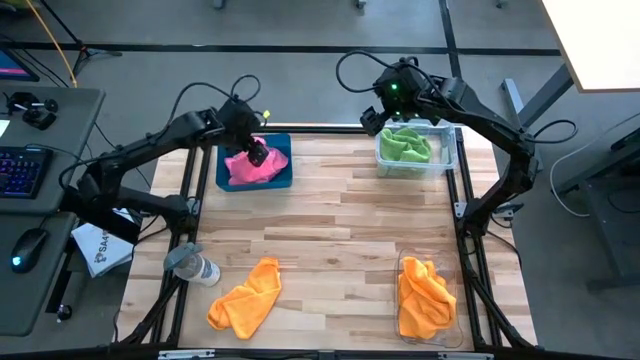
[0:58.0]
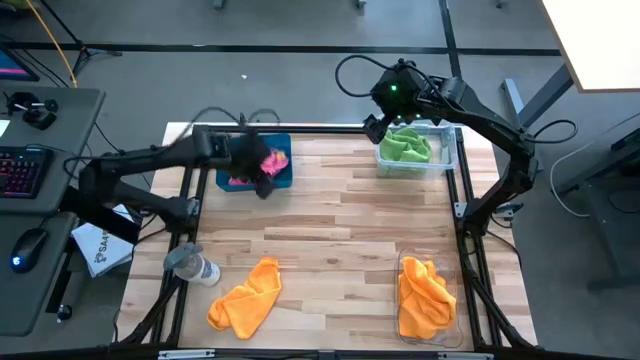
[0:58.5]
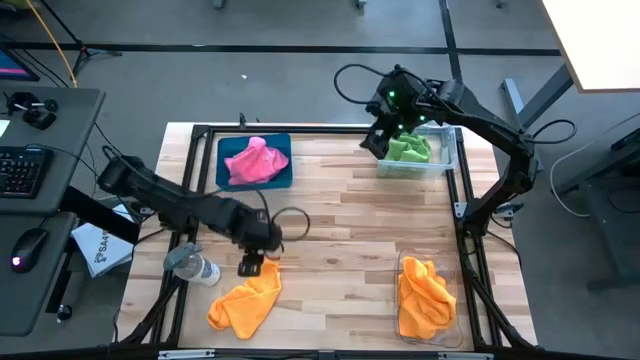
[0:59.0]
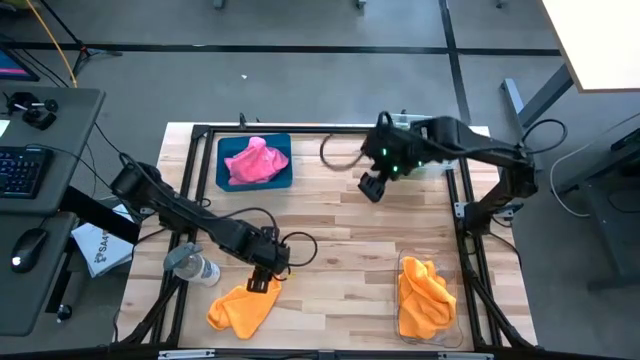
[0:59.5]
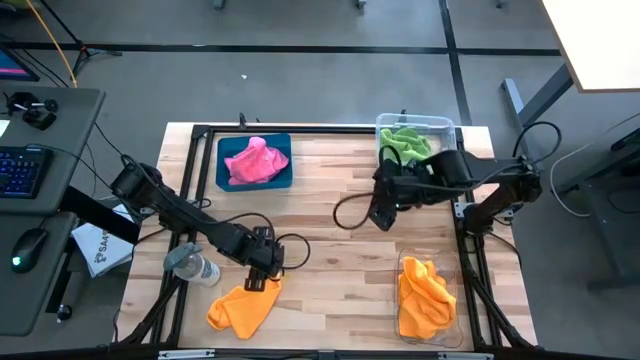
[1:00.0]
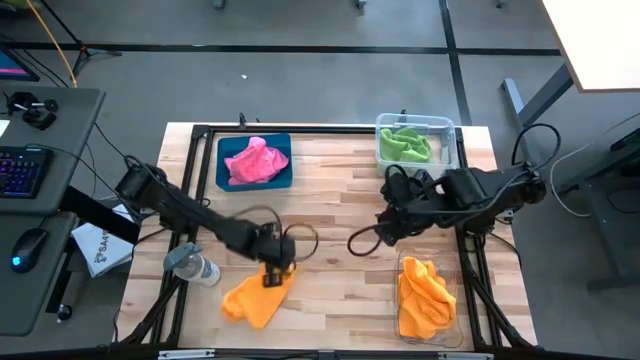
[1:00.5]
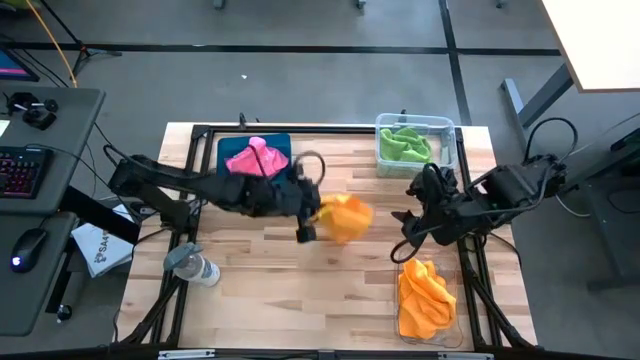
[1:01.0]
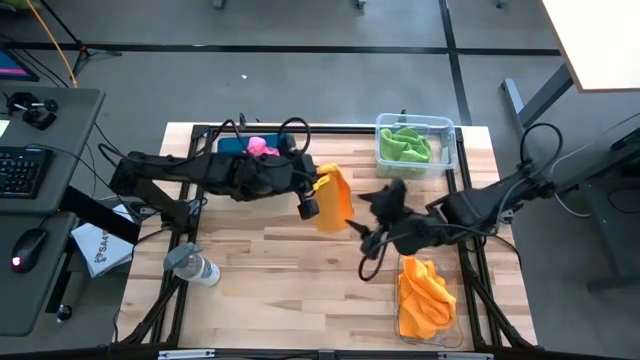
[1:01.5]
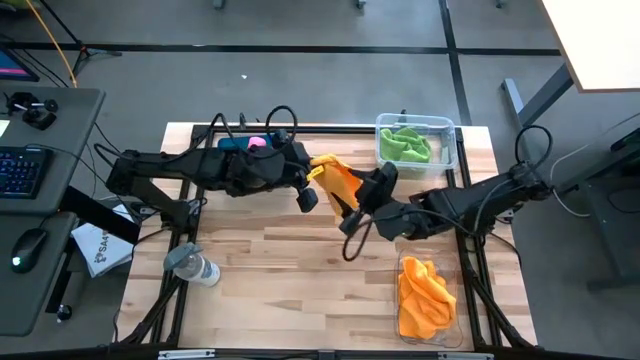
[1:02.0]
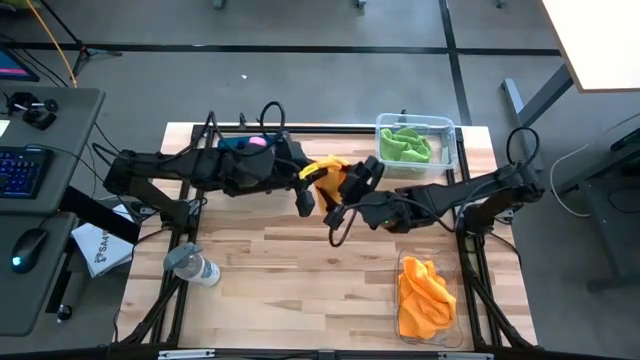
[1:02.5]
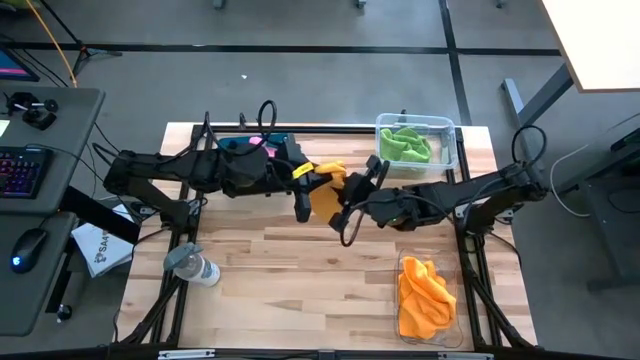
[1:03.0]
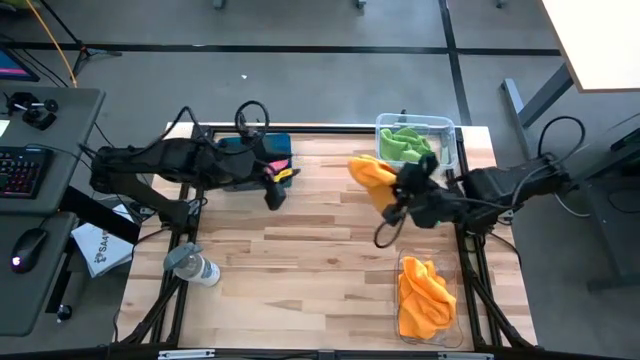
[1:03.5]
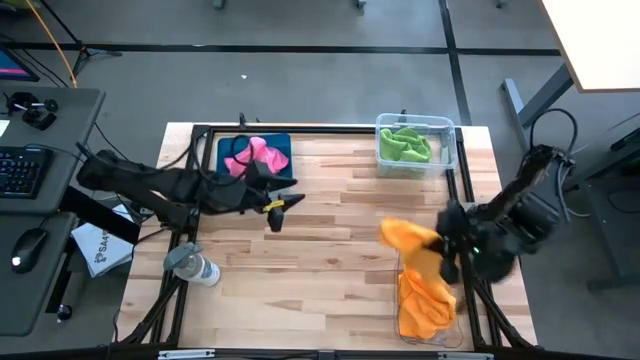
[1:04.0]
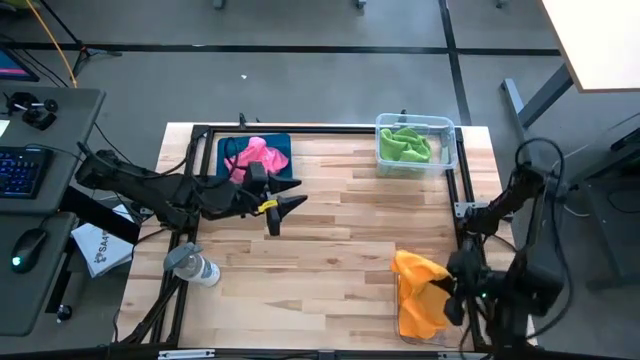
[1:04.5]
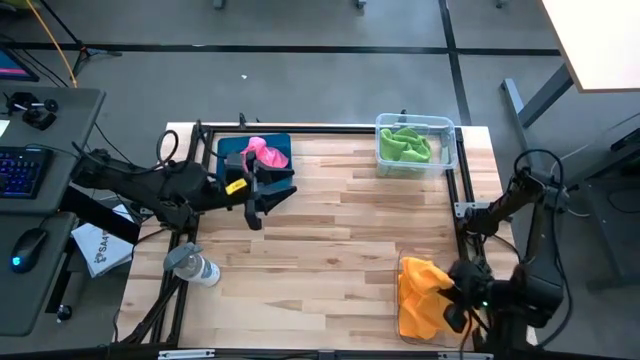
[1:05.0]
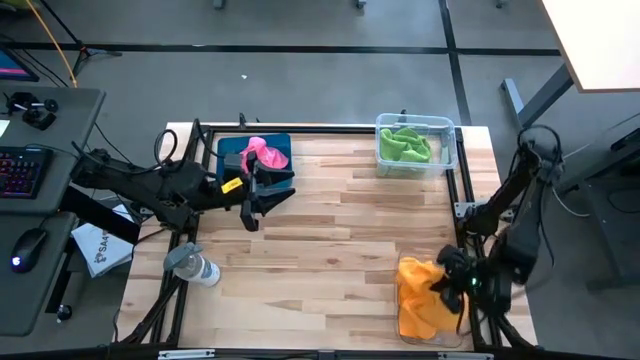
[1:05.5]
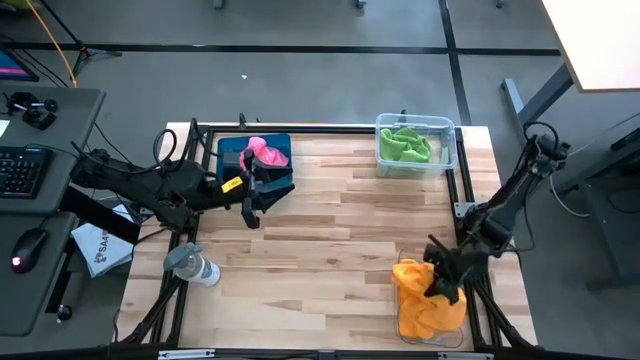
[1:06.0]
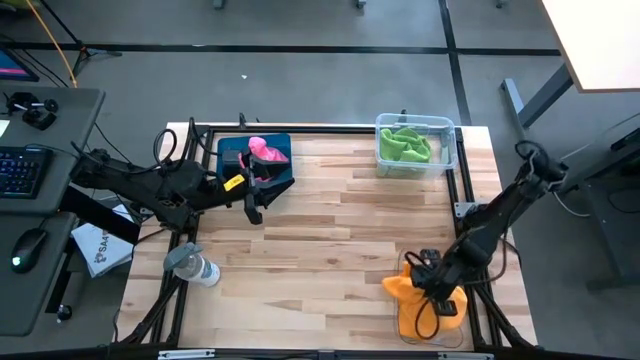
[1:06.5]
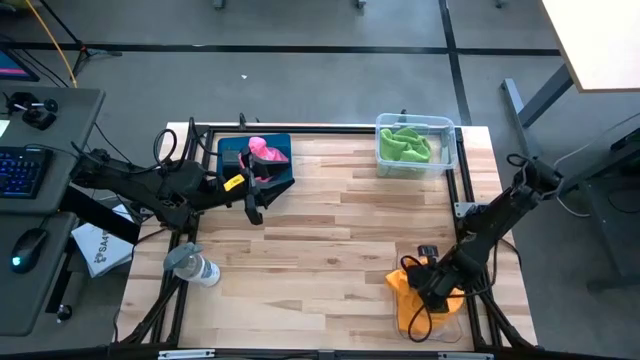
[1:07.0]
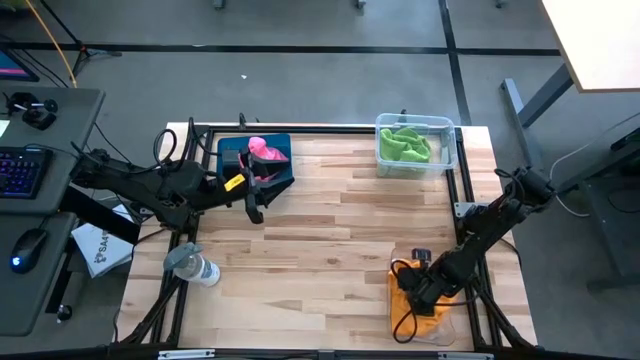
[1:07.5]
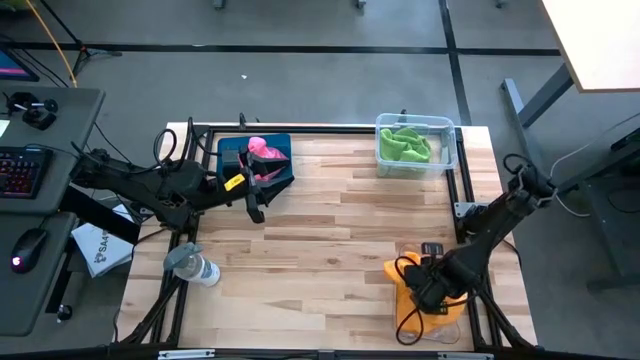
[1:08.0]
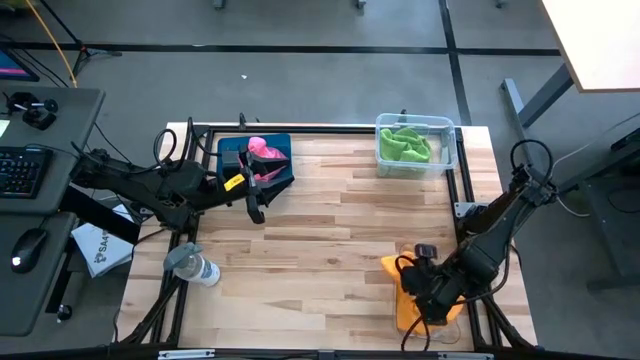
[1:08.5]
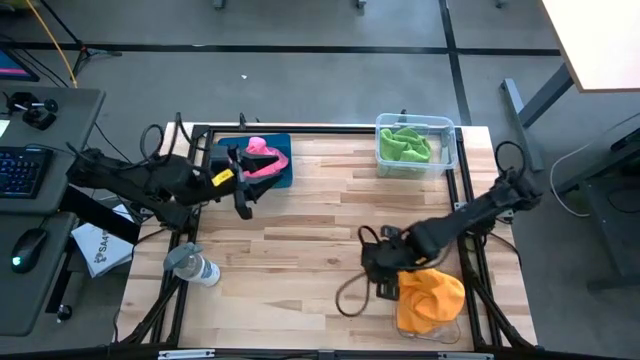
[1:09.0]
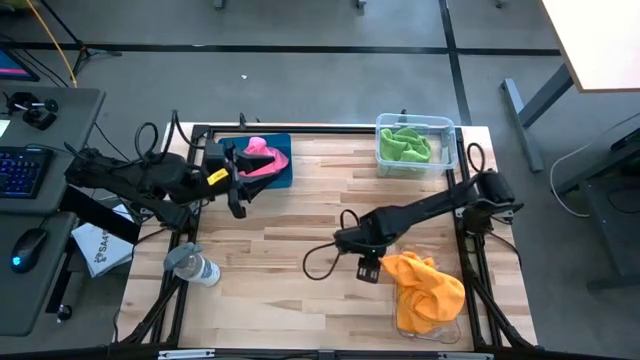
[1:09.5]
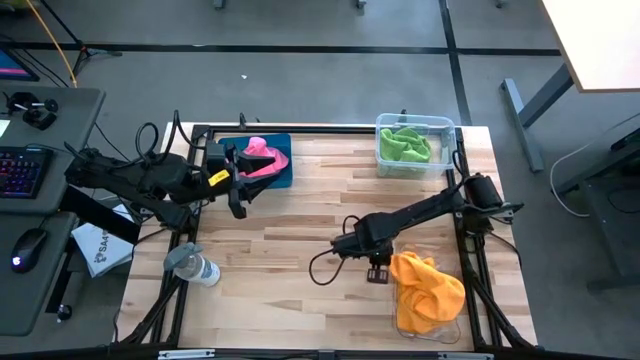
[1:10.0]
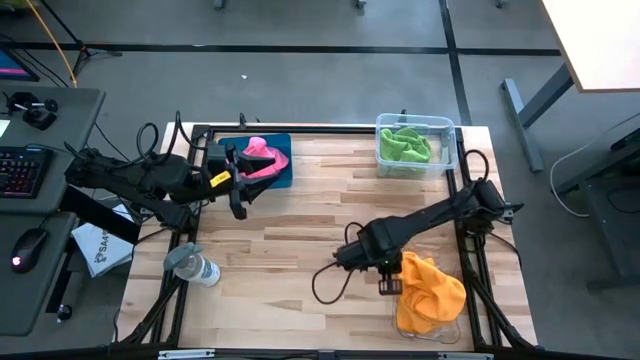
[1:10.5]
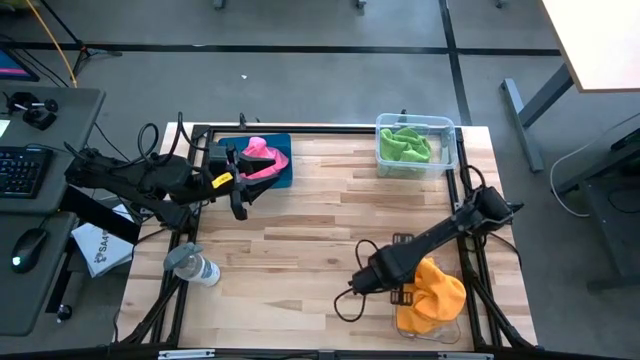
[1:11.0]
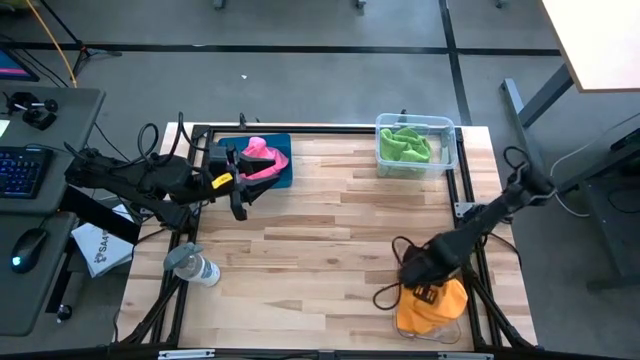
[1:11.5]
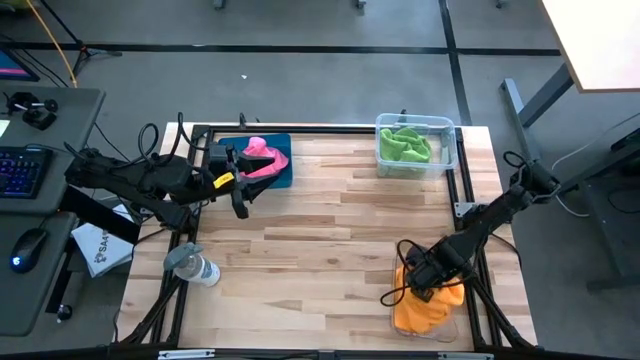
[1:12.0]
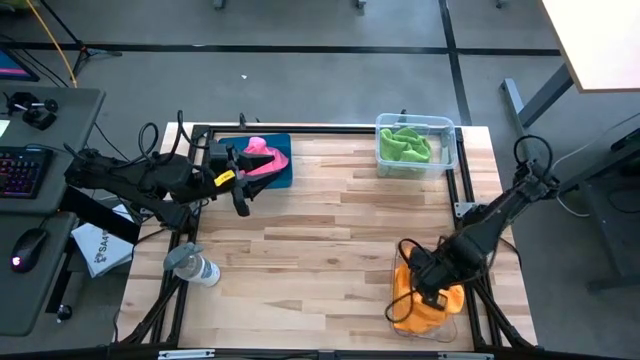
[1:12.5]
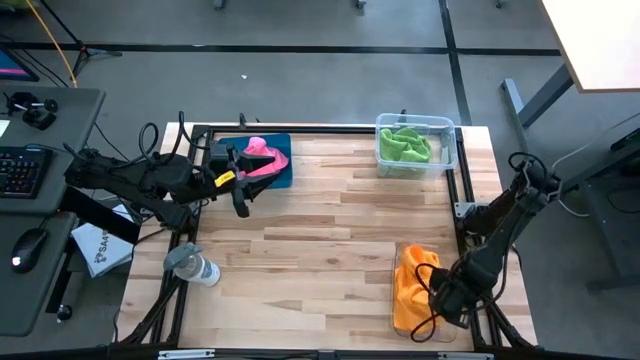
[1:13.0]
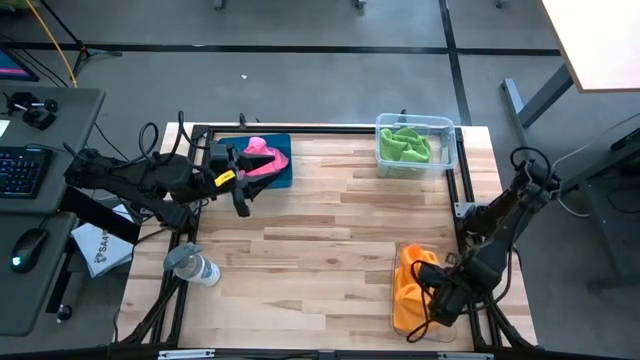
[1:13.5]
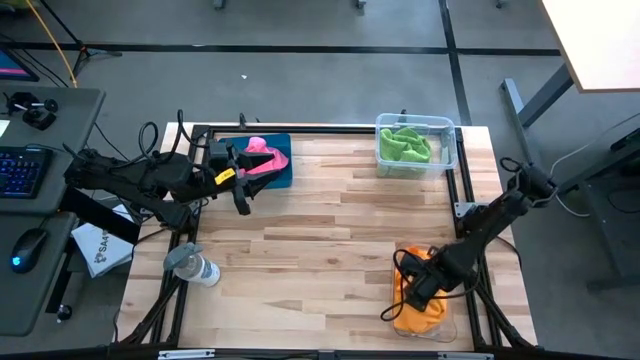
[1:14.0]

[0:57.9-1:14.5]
Task: Sort microfiber towel by color & place in baskets
Put the orange towel into the bottom transparent bin

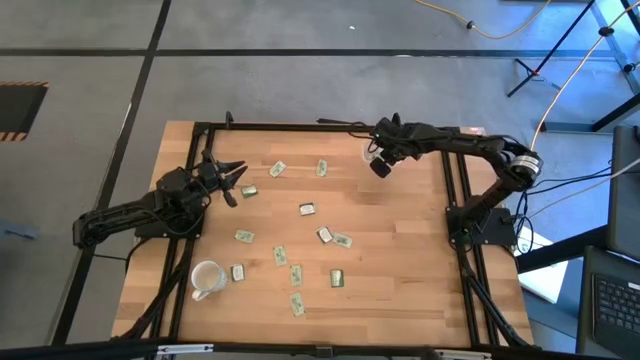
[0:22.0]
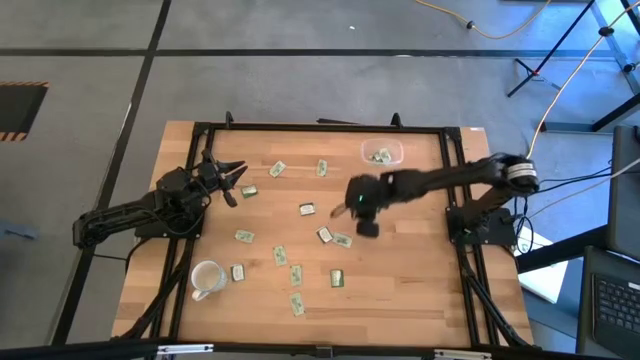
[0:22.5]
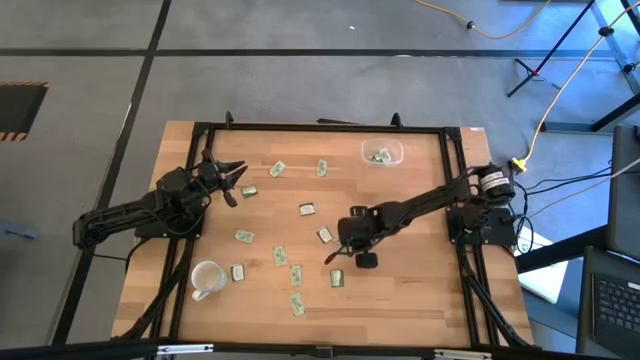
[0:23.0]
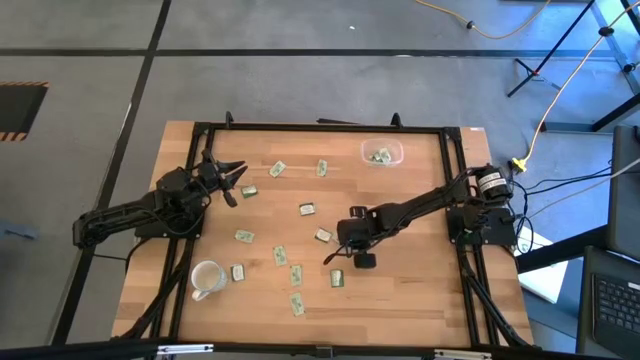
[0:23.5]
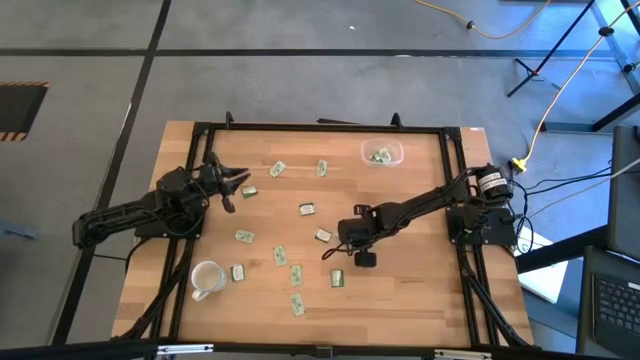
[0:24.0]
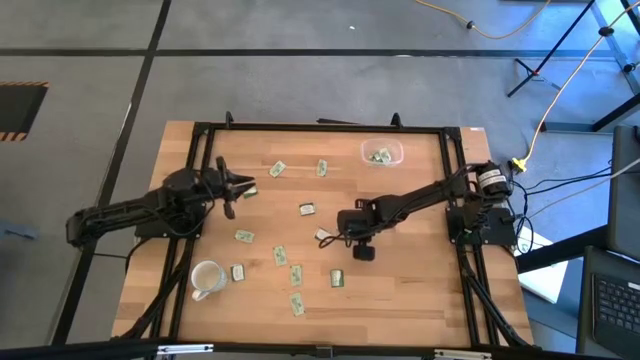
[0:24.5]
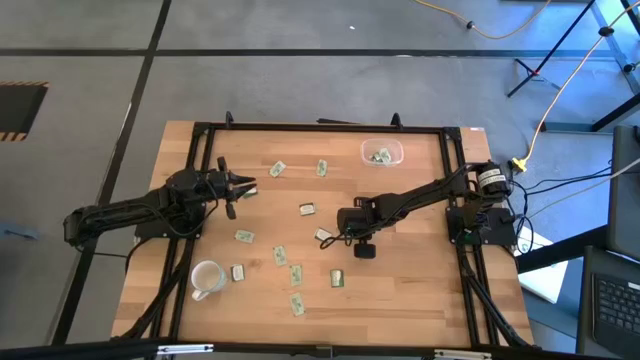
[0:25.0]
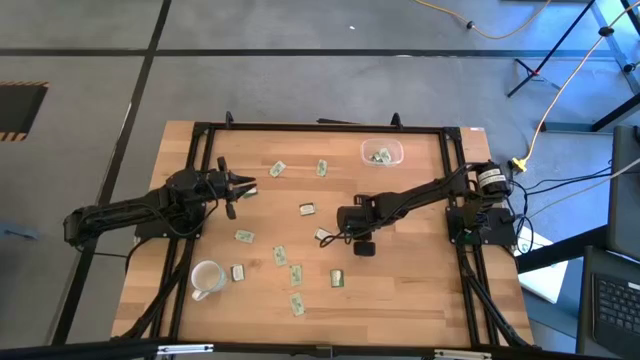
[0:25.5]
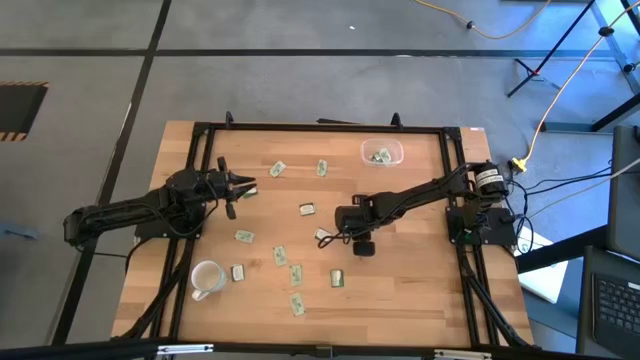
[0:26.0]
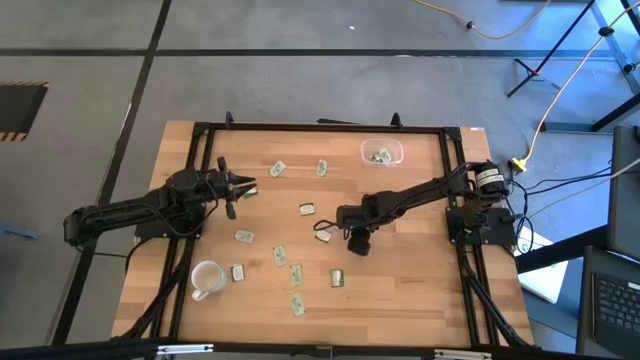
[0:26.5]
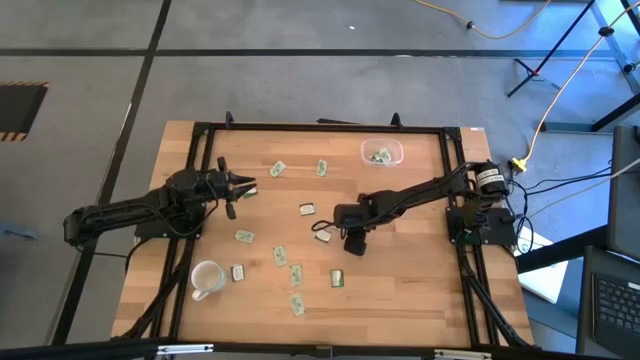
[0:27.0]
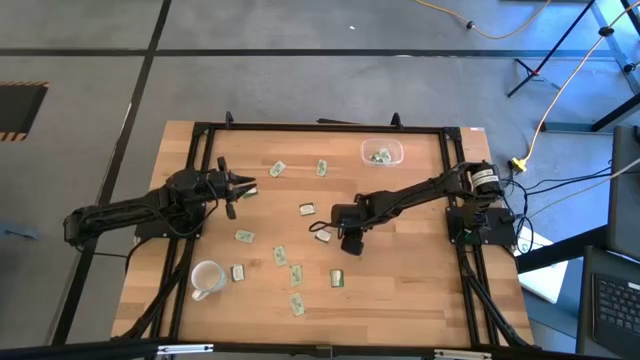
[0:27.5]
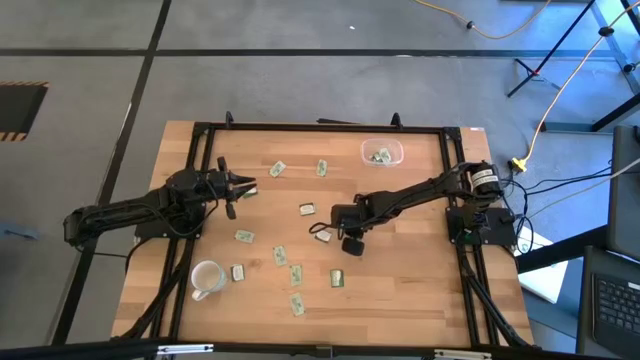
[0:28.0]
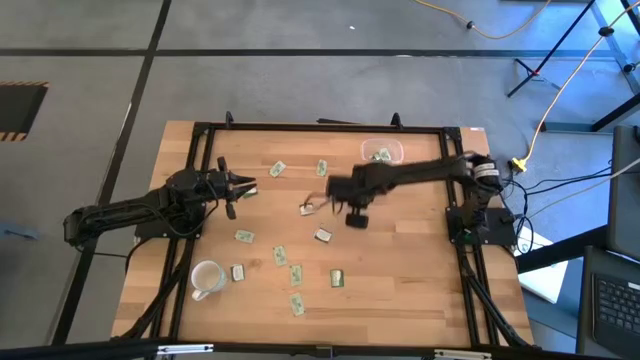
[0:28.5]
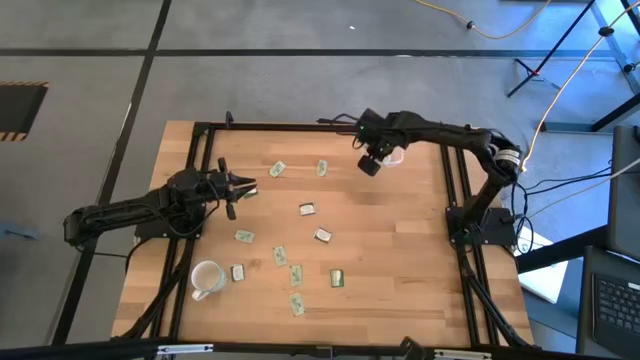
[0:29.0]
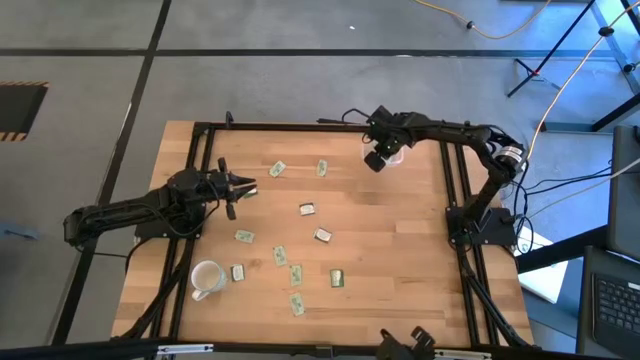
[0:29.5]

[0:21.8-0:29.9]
Task: Pick and place Stevia / Truvia into bins
Put the green stevia packet into the transparent container
